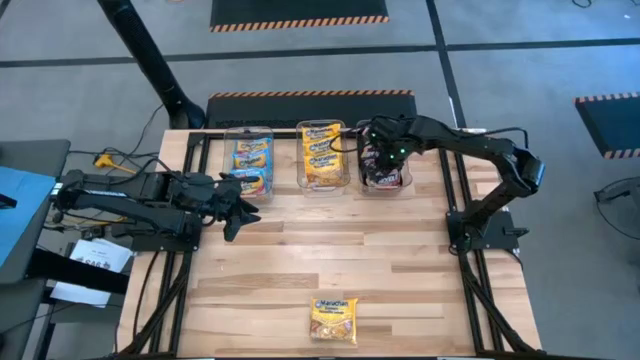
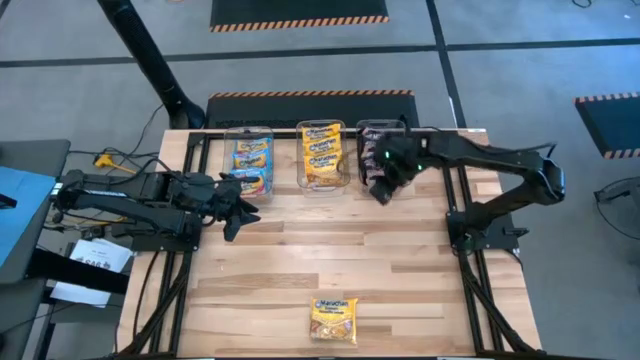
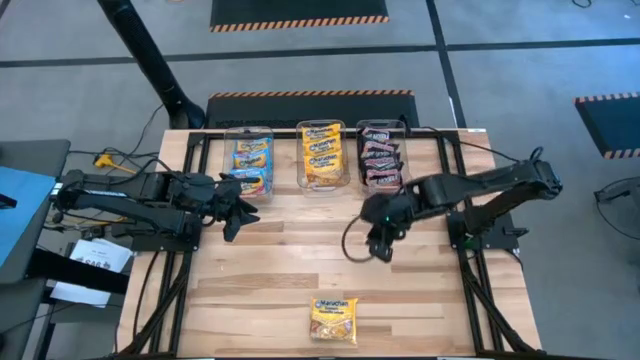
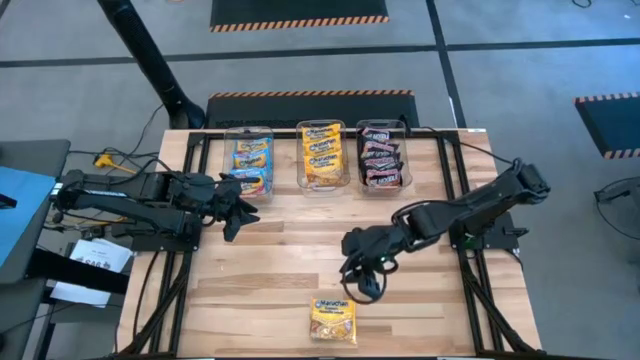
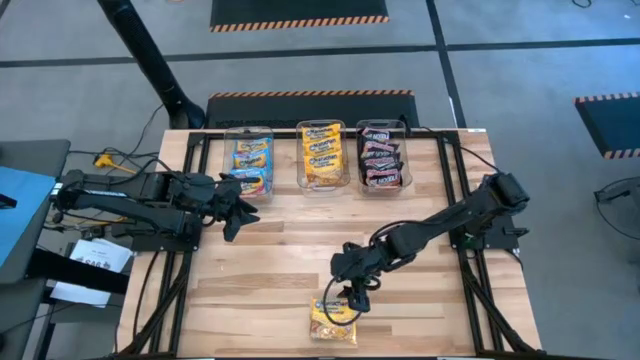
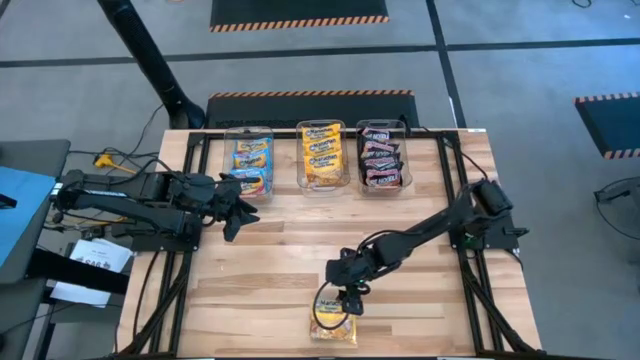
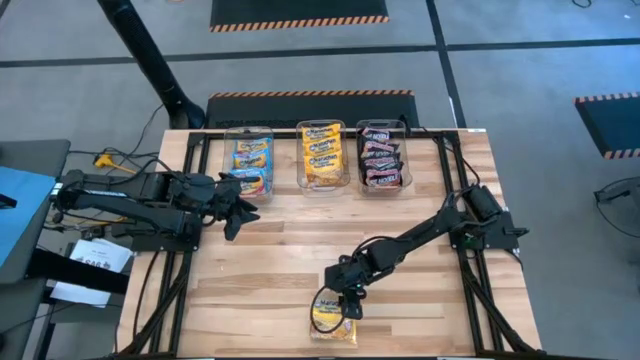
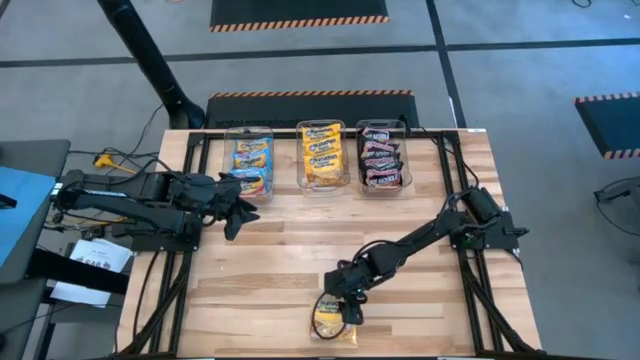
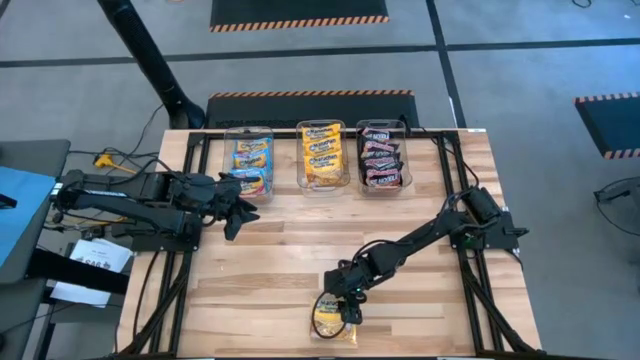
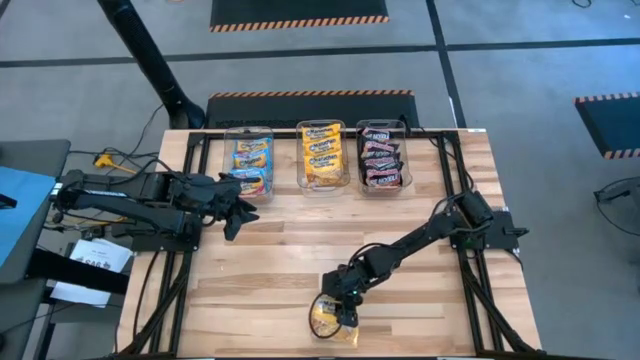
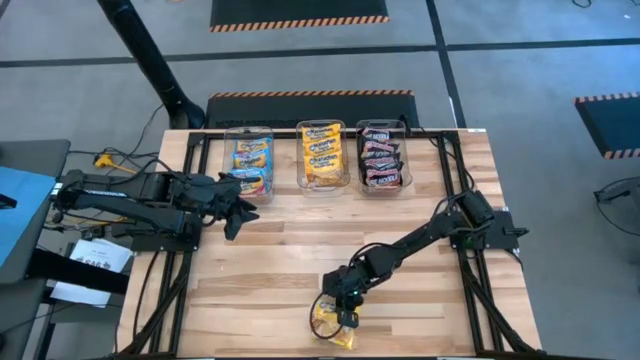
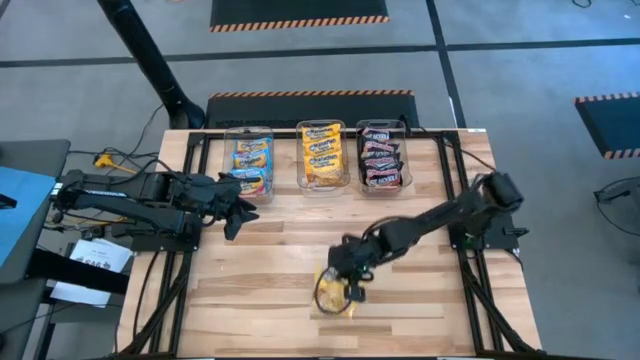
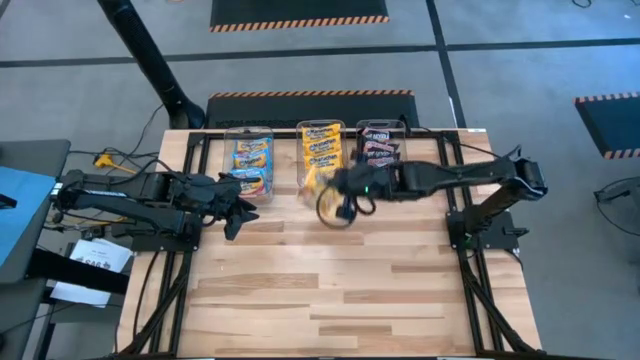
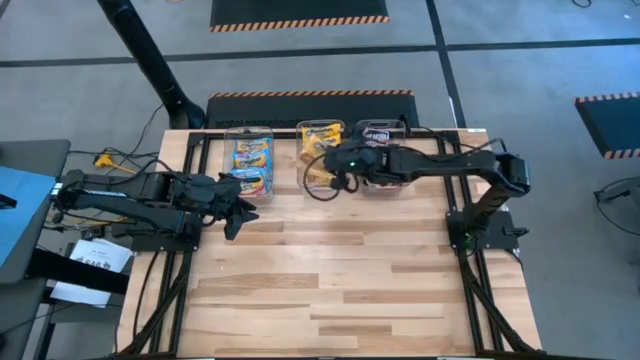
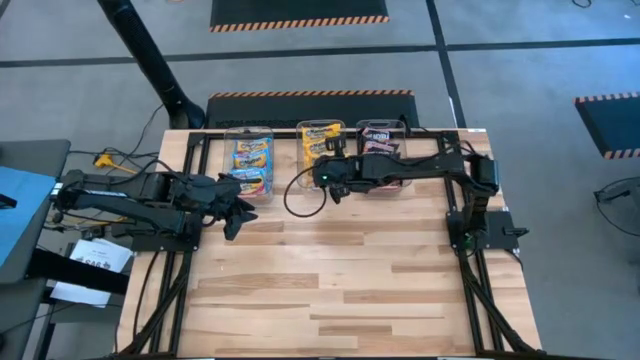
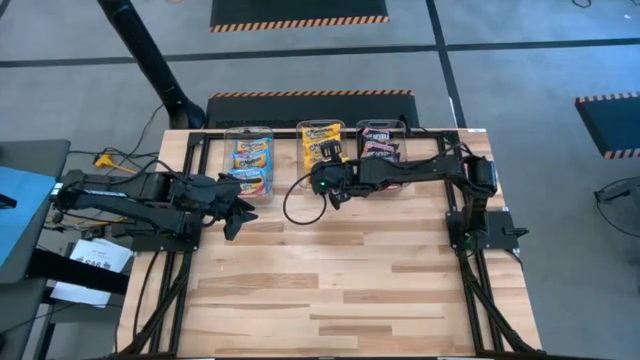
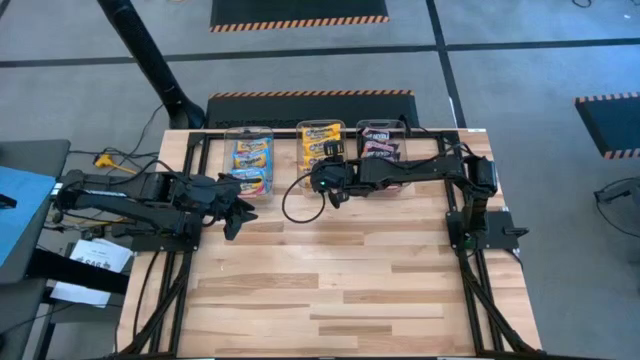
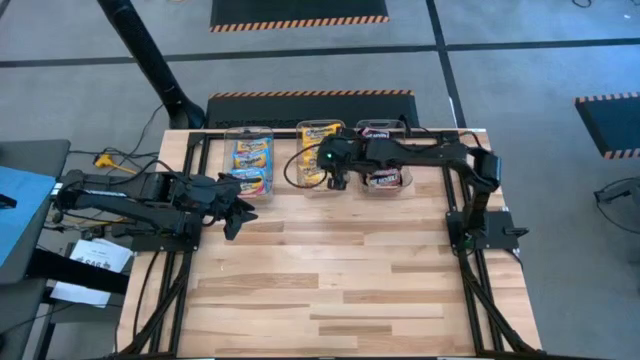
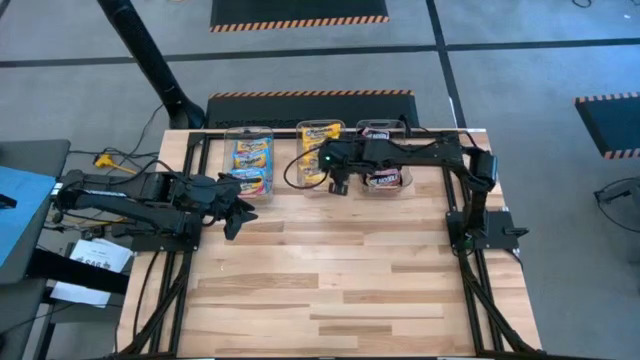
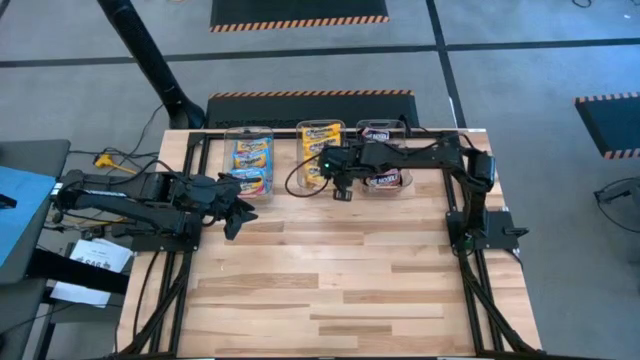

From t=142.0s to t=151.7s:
Task: Sort Maruchan noodles
Put the yellow noodle pack into the middle transparent bin

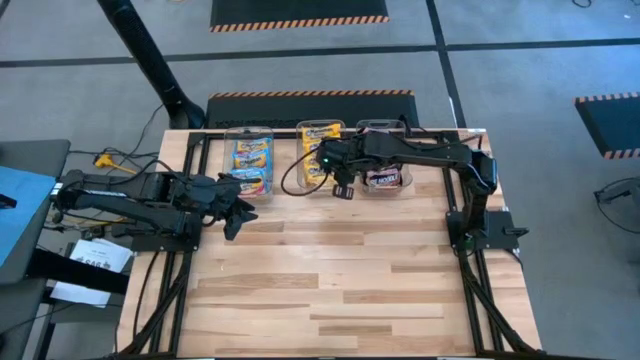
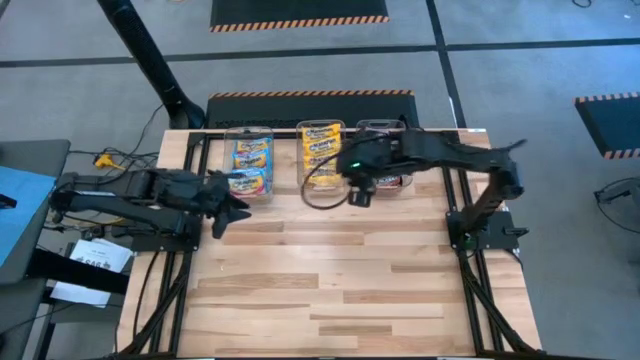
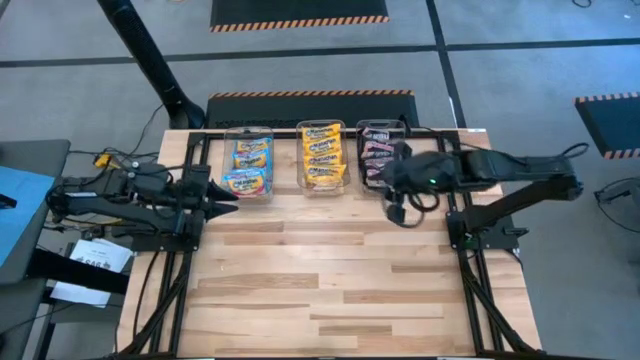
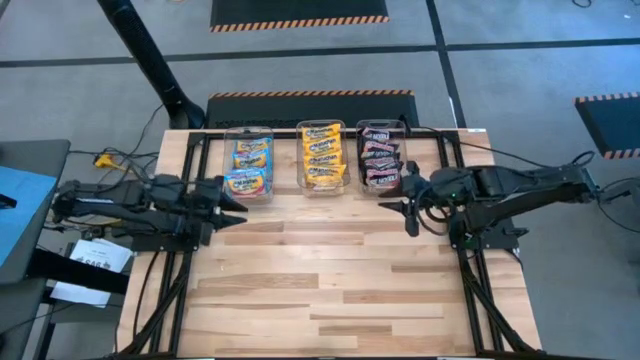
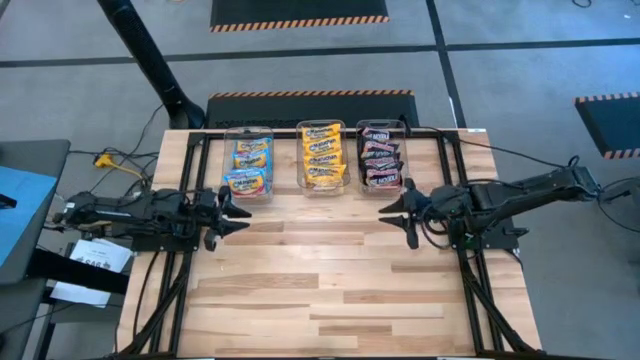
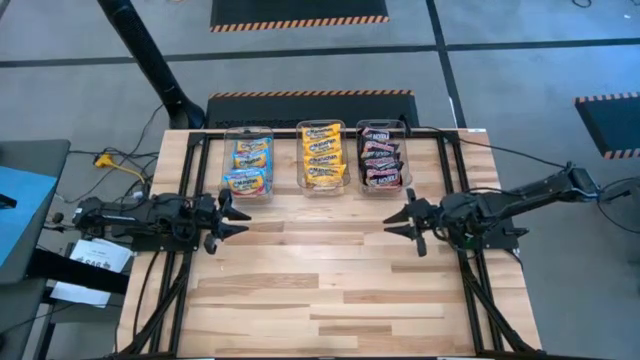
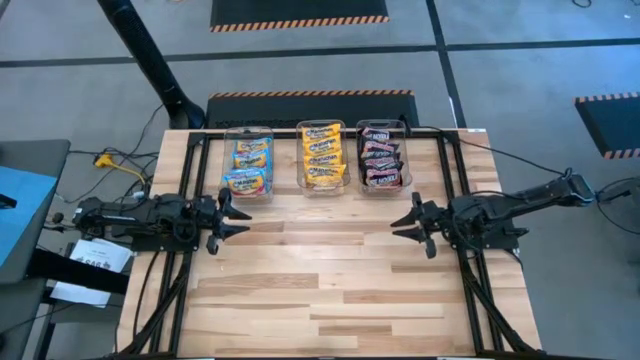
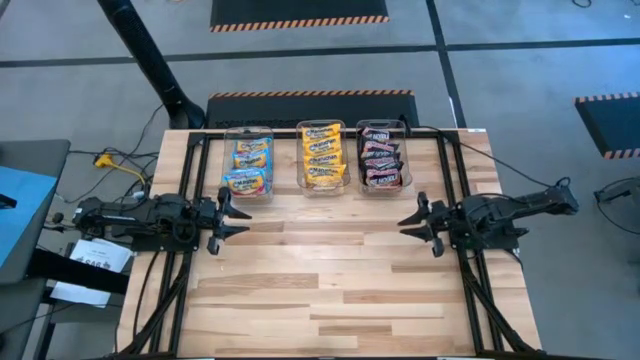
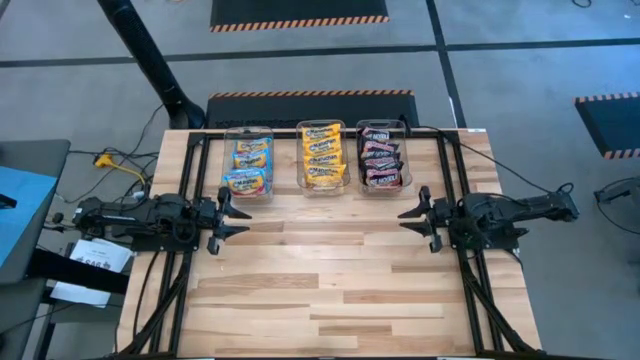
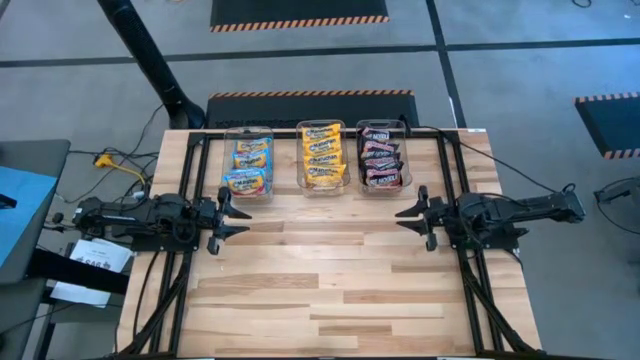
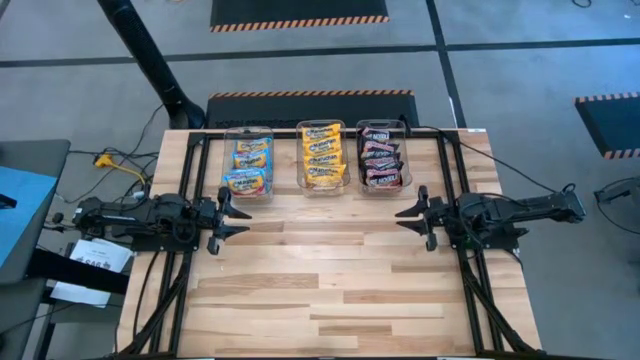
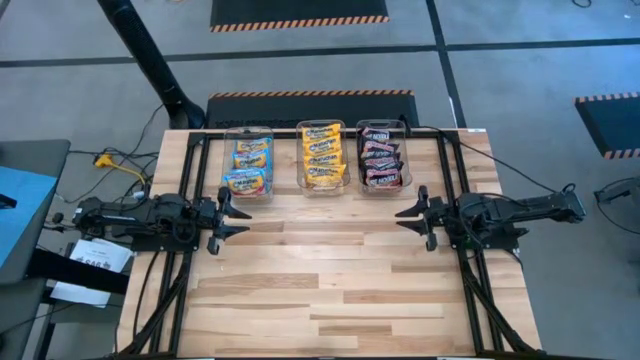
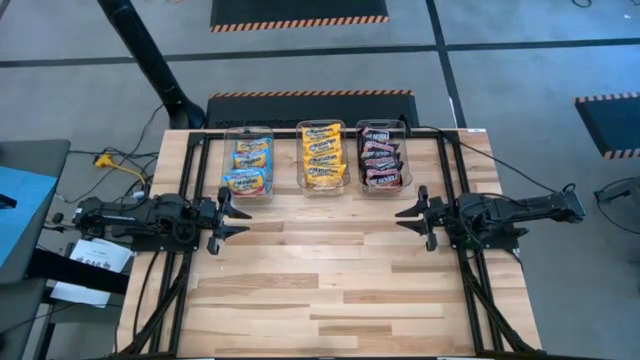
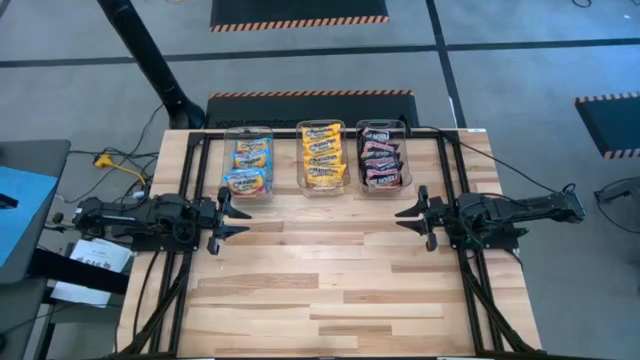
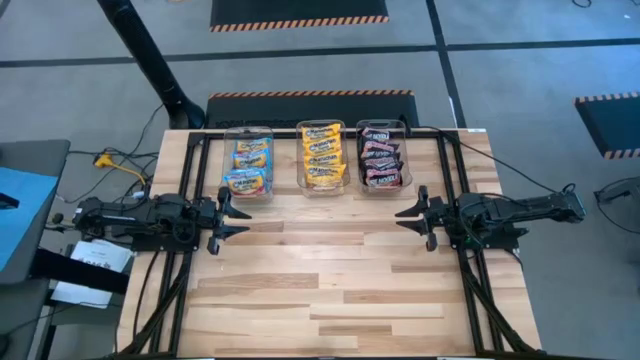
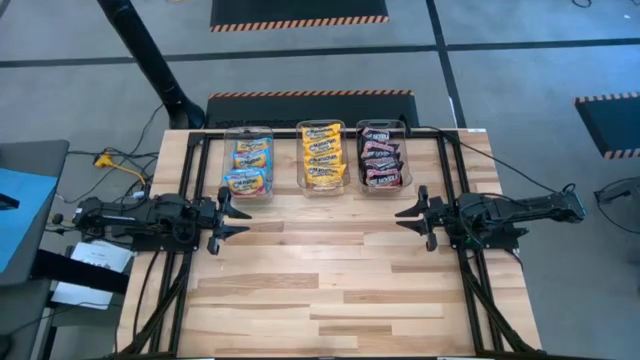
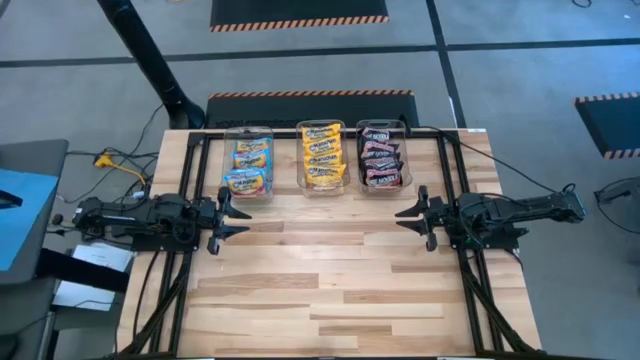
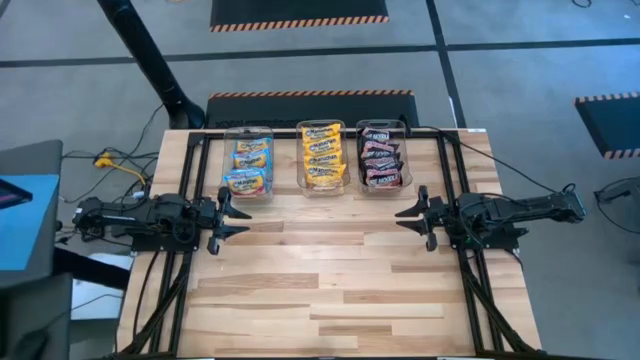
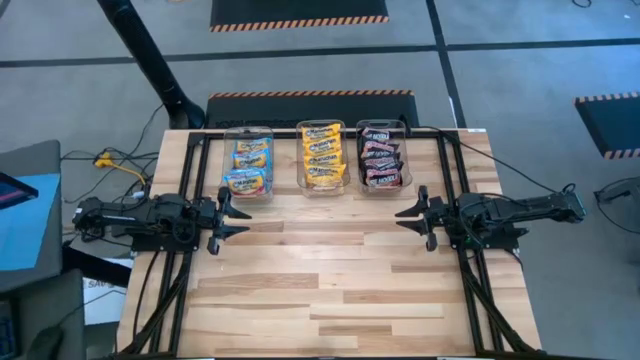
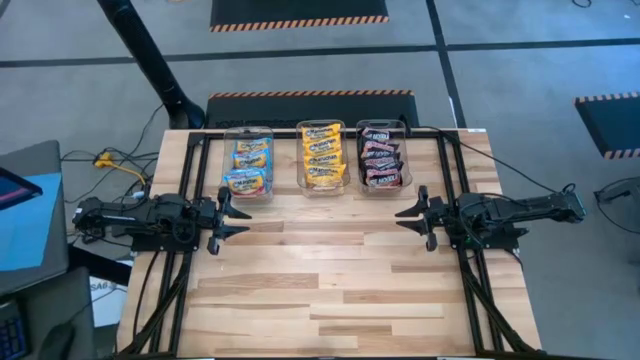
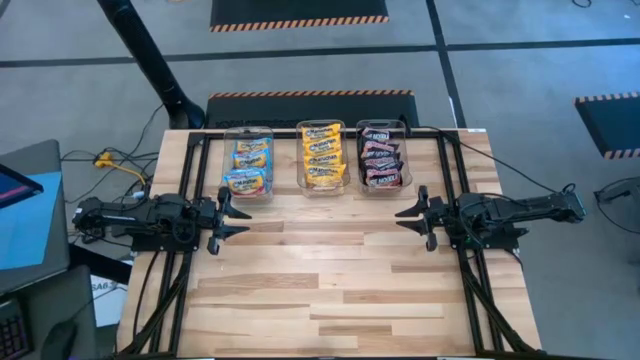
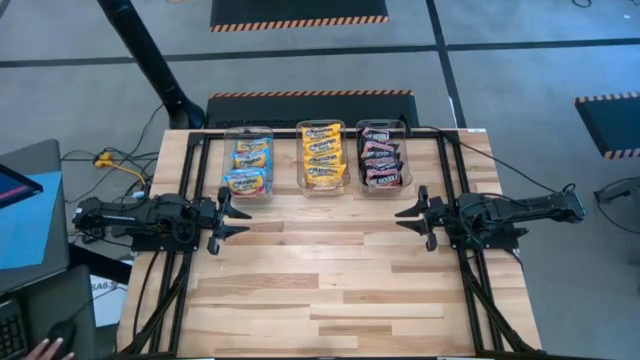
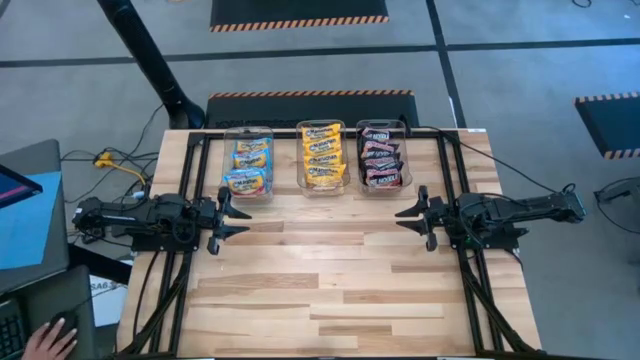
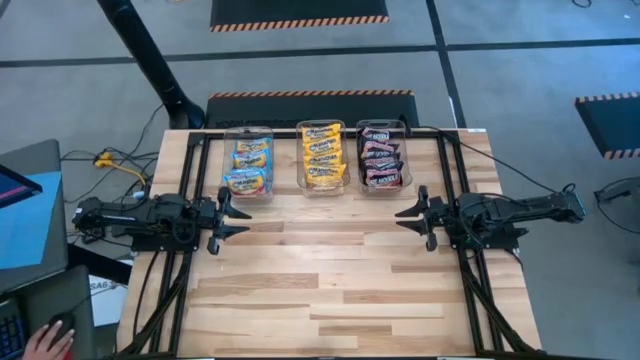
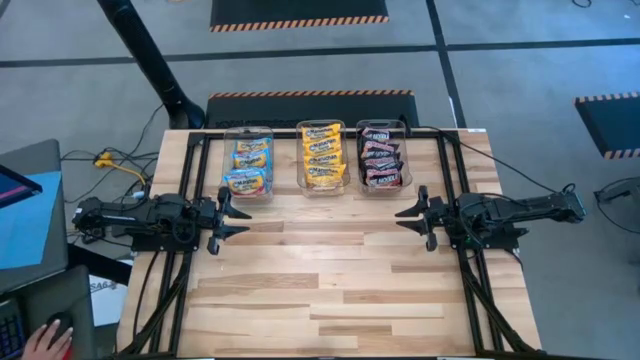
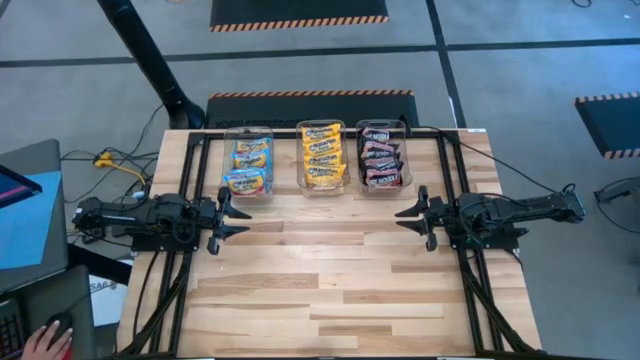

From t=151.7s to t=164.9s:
Return to Home Position
